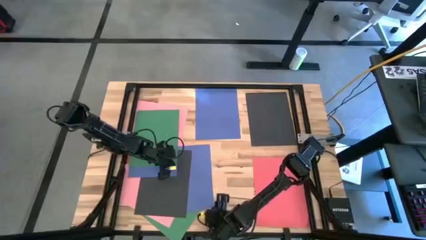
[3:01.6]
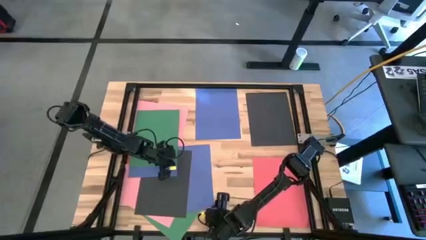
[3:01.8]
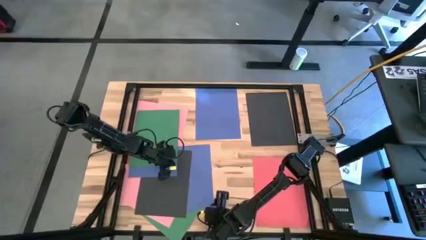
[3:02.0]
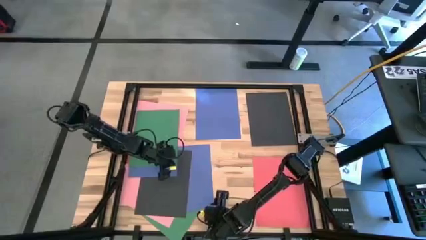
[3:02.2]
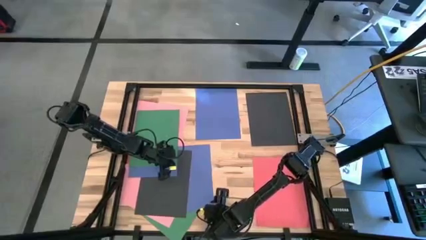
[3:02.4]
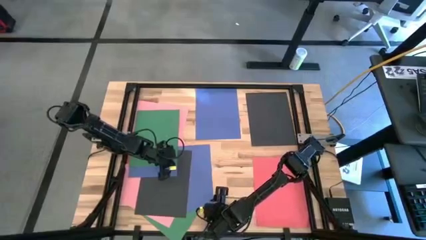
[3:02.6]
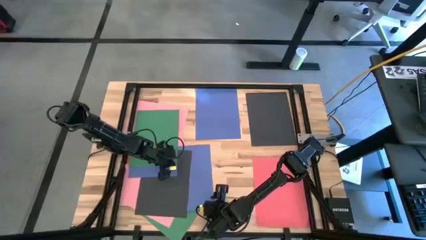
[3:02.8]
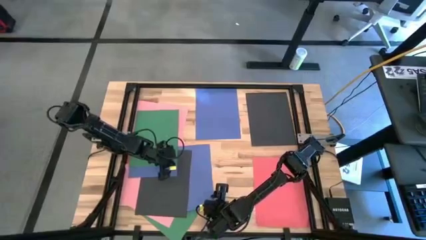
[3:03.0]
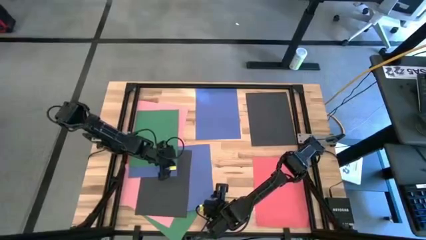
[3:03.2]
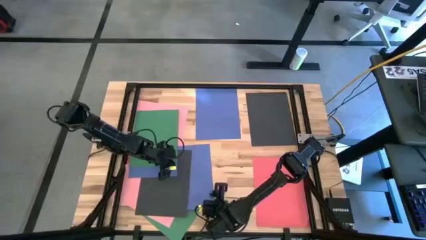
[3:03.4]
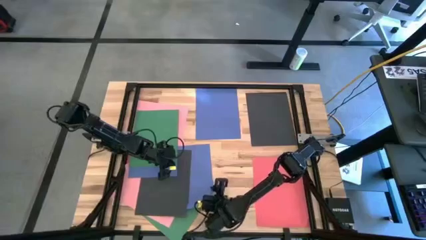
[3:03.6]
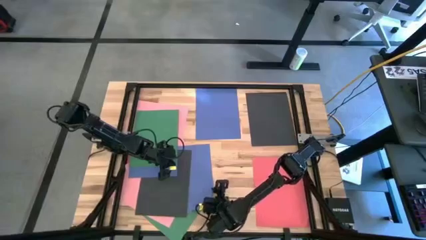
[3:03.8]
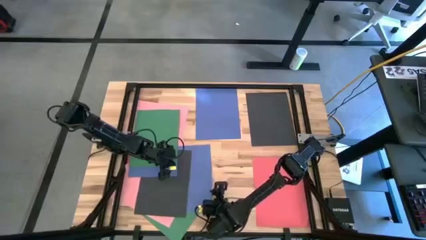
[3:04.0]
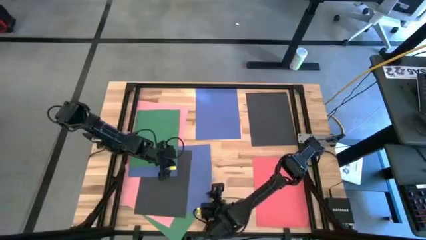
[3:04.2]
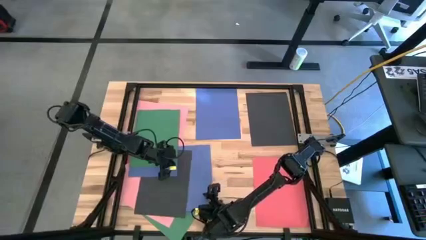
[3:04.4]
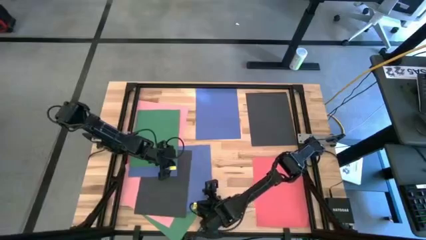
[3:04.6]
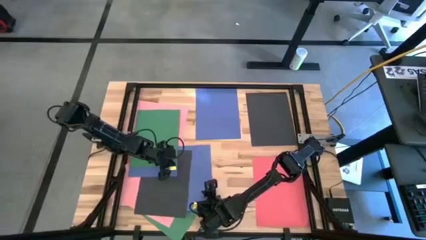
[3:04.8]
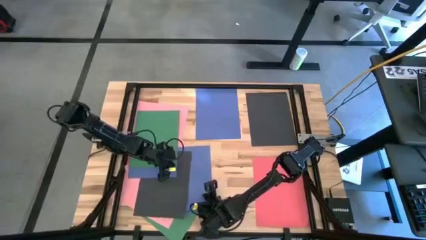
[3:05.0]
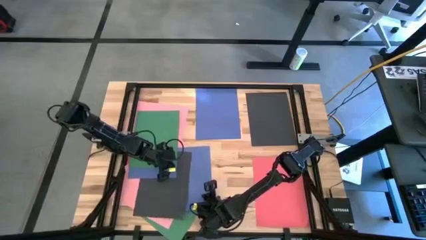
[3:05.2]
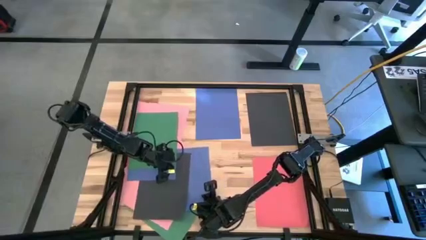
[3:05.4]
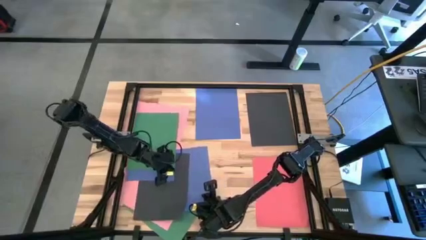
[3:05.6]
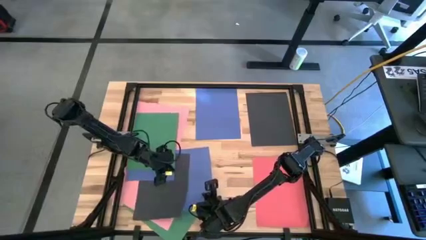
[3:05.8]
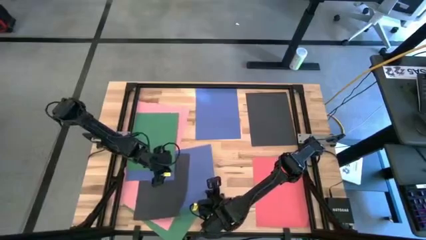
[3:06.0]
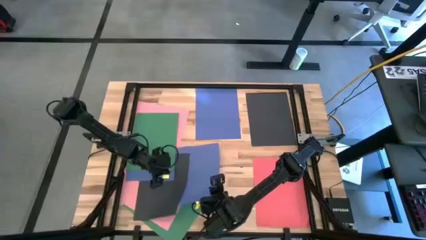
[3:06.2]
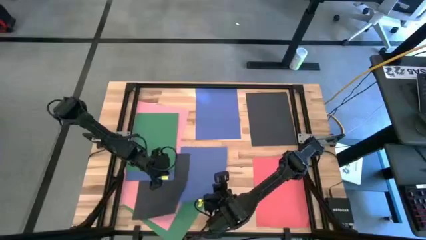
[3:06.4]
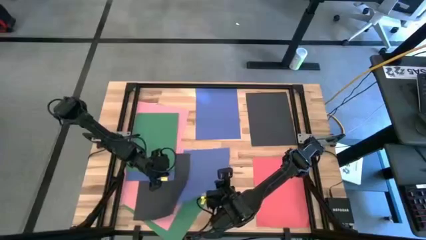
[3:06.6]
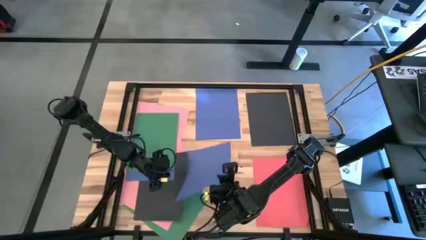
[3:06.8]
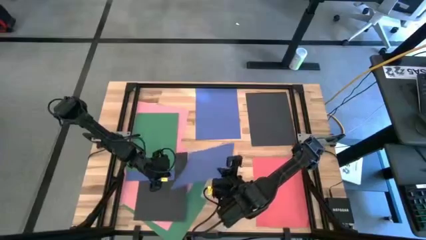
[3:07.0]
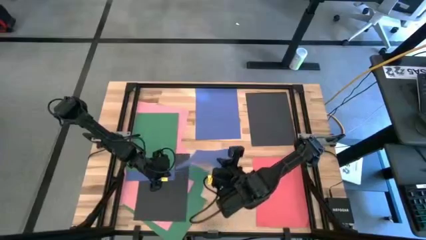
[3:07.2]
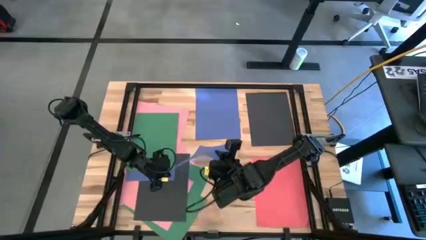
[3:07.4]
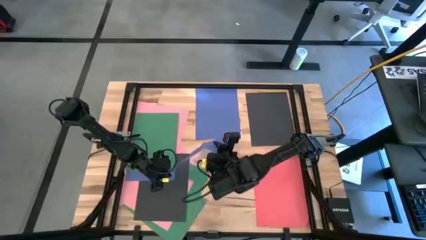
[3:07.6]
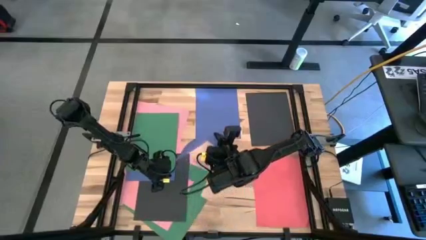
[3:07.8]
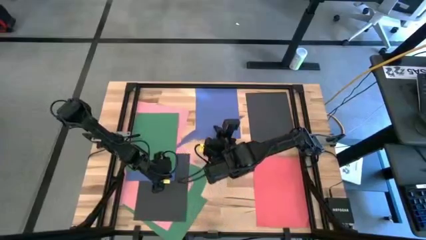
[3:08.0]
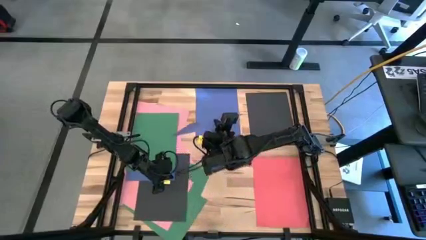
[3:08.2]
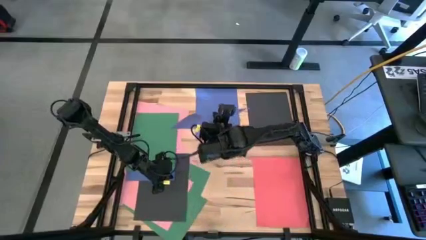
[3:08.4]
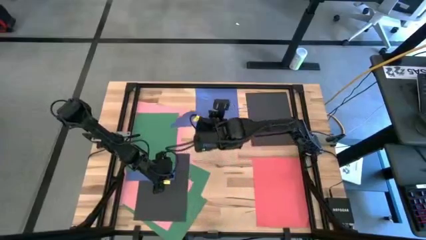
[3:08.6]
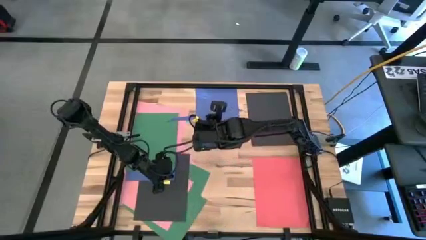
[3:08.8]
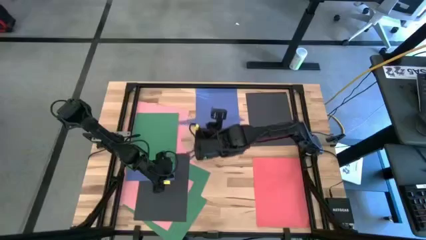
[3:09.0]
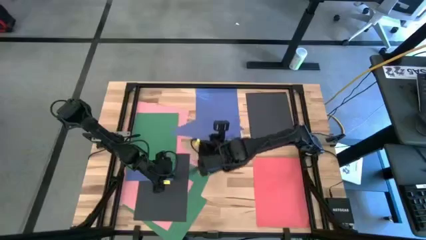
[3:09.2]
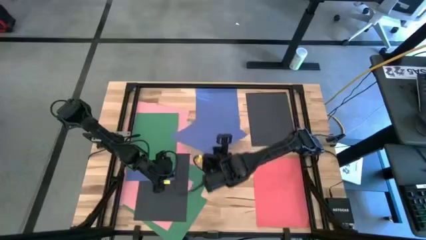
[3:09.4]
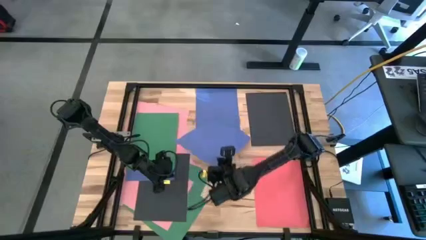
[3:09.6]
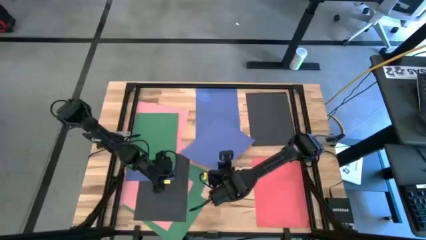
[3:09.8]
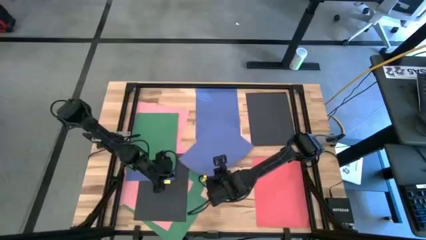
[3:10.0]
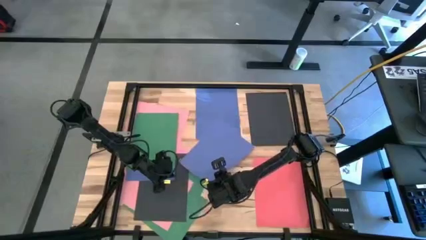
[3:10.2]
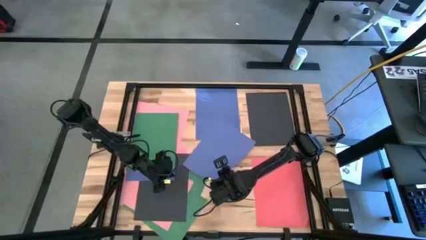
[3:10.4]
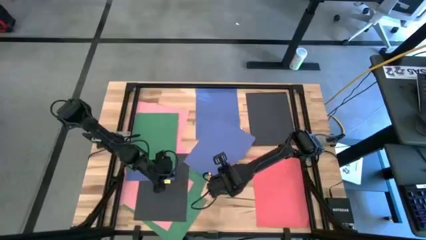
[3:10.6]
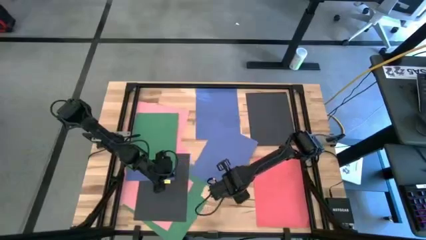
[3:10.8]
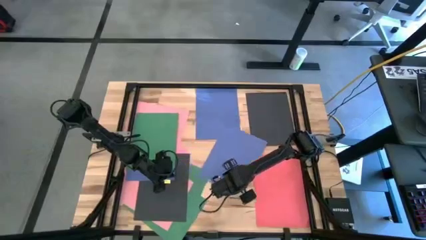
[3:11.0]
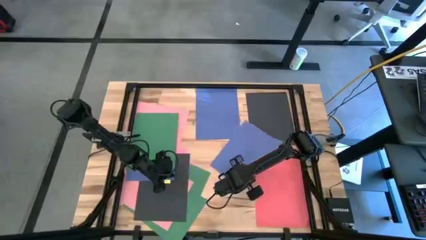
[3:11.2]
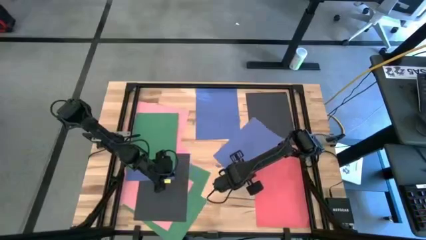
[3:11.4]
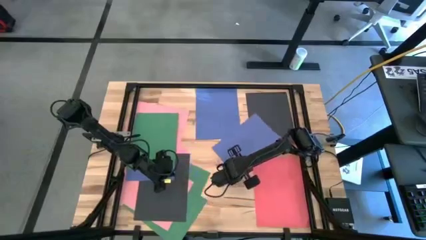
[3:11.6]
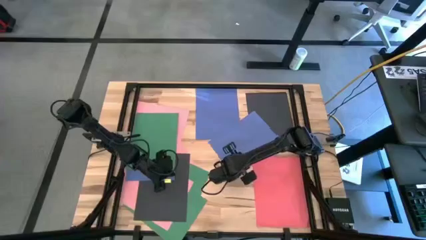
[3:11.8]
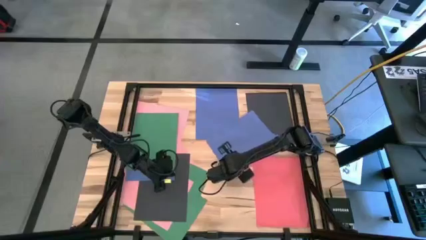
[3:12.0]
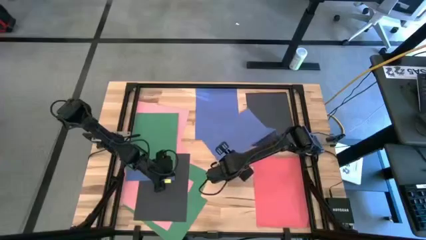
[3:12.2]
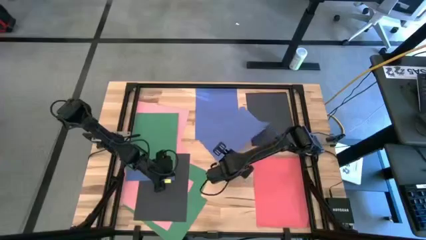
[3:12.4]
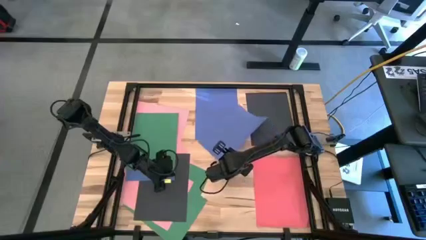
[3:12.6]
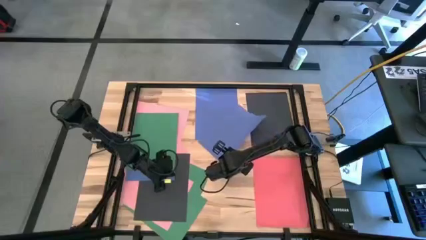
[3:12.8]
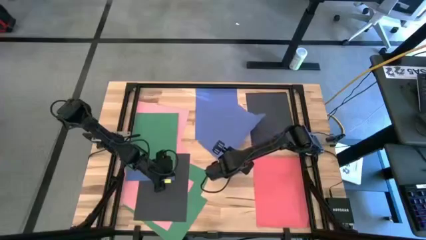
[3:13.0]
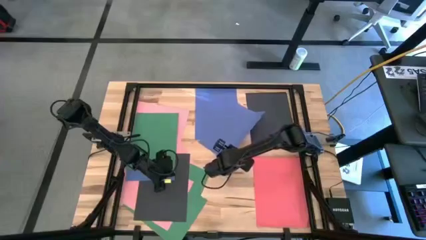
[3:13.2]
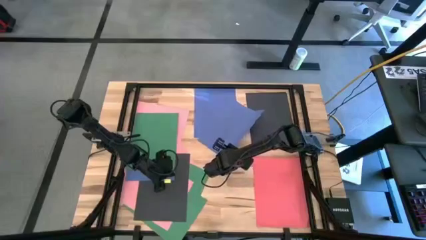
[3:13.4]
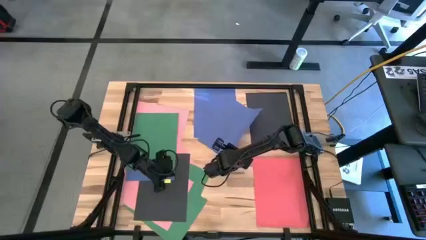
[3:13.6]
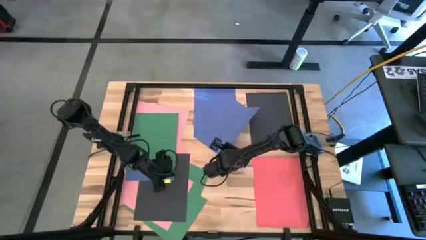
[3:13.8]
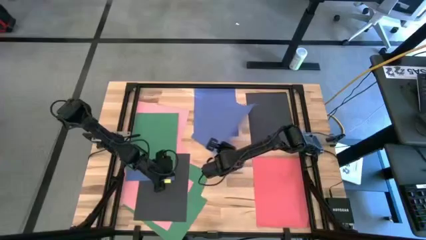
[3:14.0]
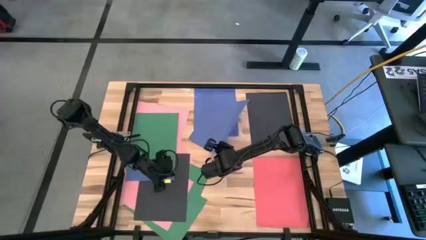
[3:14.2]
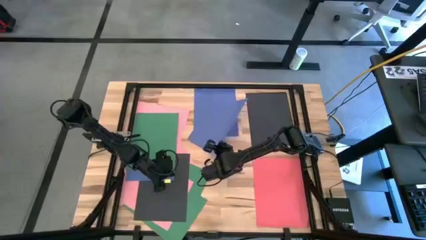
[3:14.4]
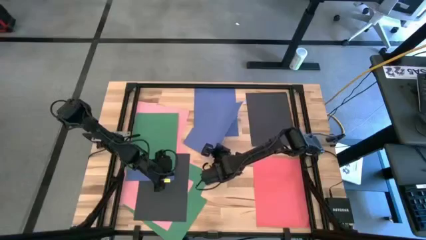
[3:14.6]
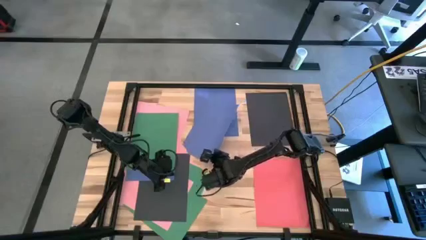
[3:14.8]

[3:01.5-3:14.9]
Task: Organize paper
Stack the blue paper on top of the other blue paper on the table

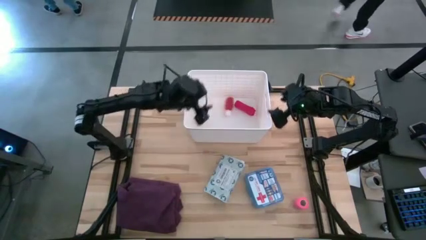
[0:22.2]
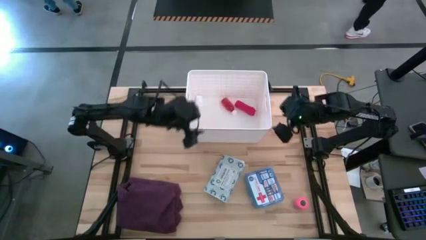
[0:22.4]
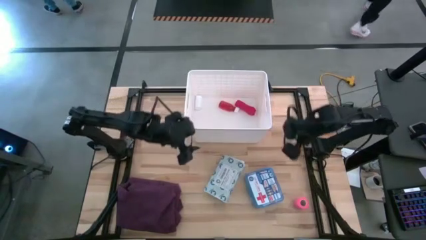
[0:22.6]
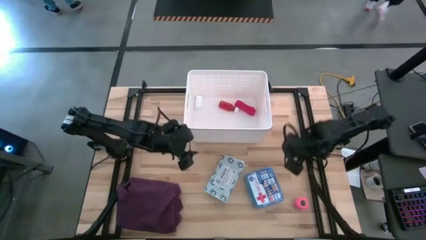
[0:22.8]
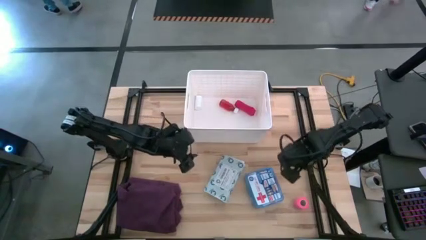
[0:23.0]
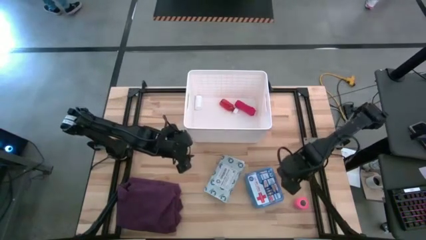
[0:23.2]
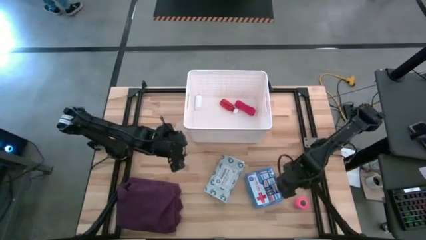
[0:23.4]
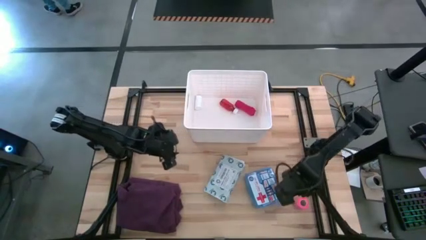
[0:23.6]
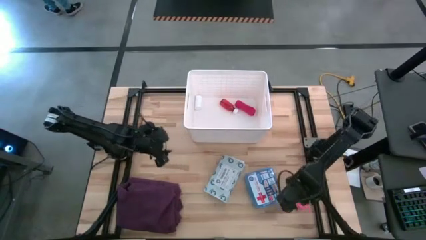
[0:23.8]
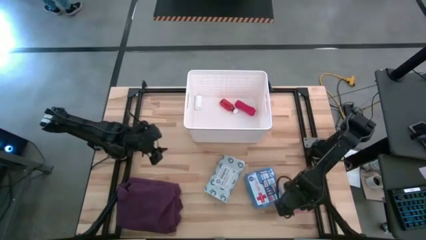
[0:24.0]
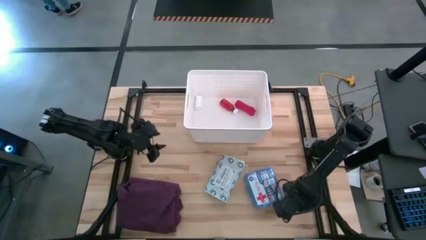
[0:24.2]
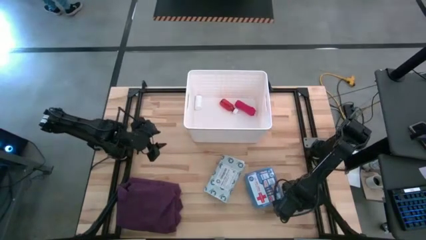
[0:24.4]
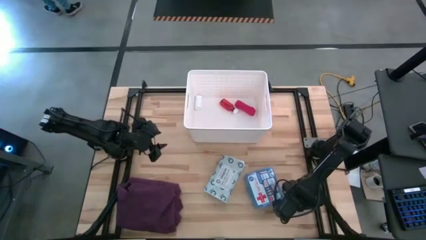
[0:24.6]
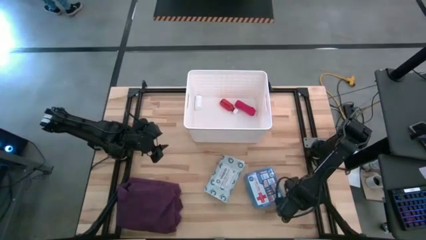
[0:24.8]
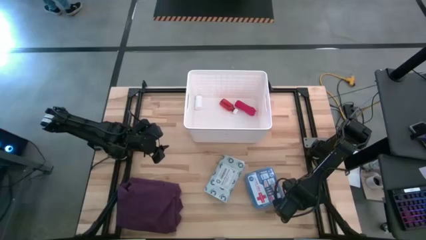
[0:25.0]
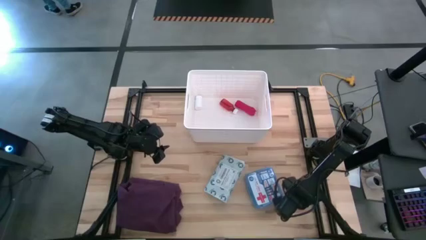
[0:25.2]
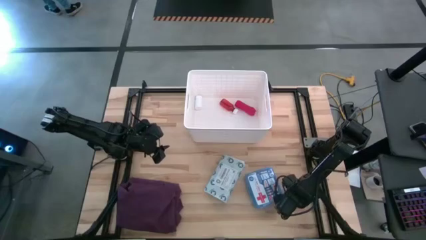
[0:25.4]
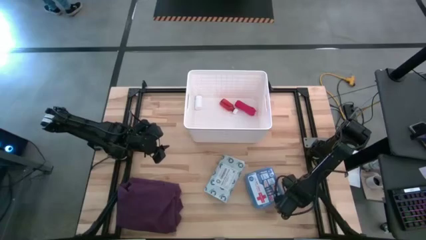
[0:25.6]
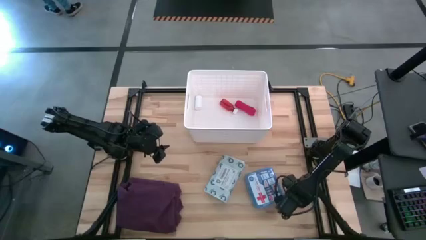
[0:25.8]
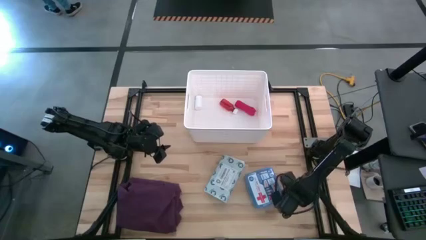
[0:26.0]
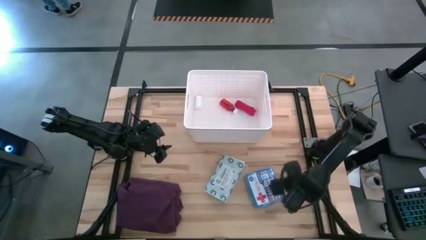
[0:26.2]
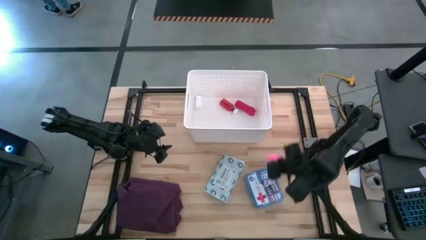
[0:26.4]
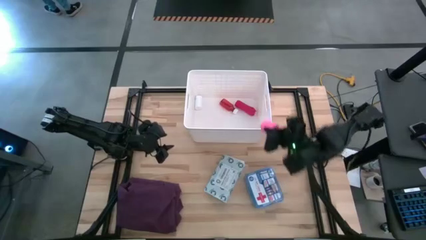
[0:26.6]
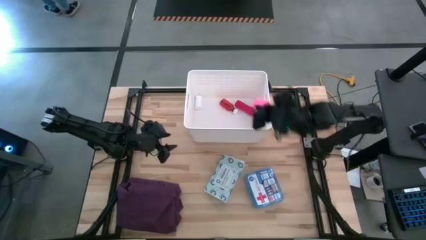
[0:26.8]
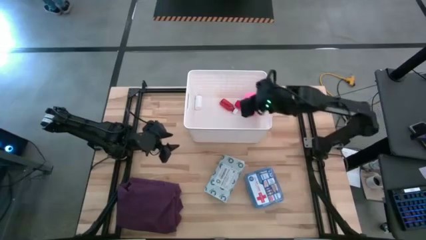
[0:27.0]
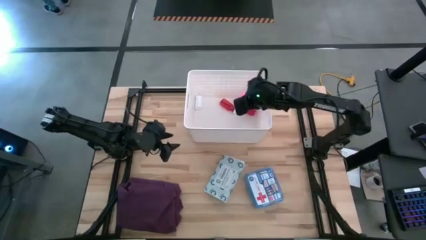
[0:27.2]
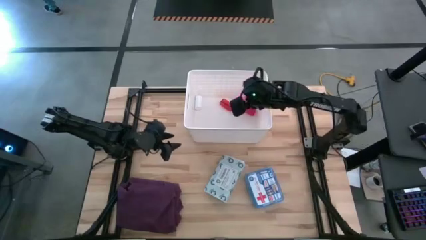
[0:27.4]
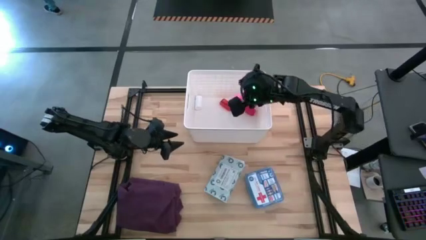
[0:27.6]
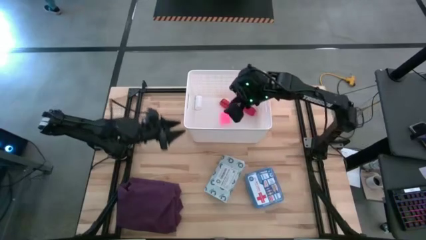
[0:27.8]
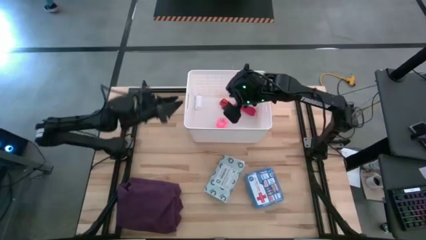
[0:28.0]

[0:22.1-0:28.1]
Task: Pick & place medical supplies in basket/bin
Put the pink bandage into the white bin
